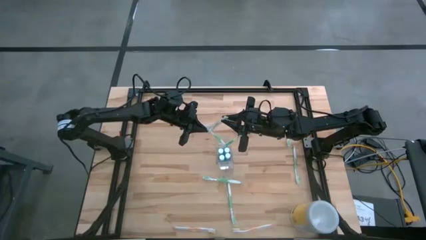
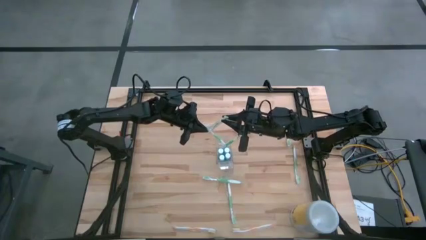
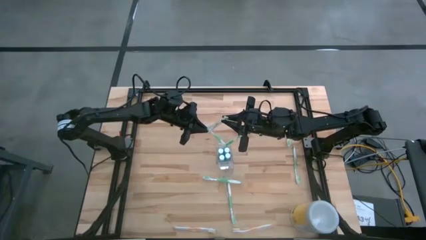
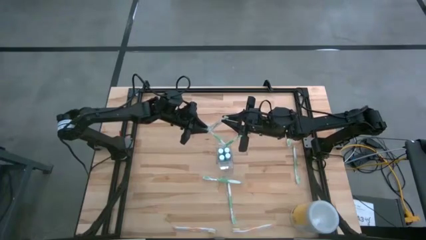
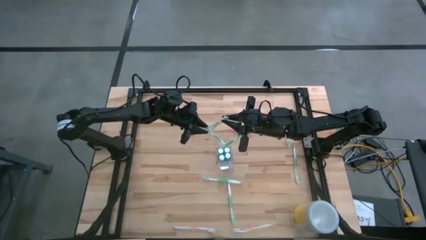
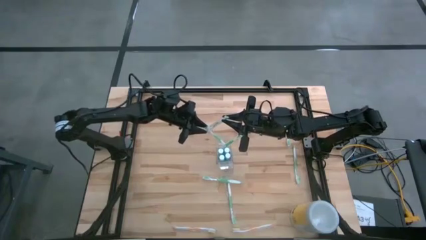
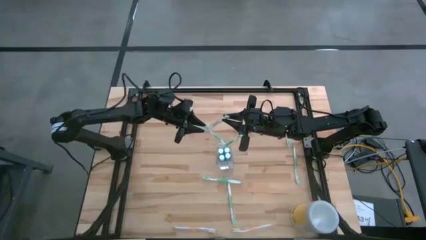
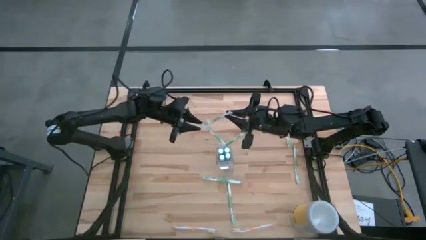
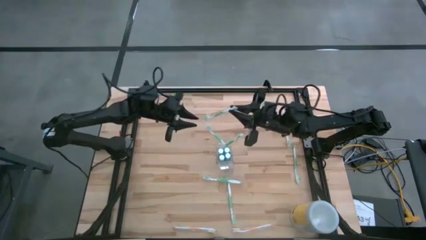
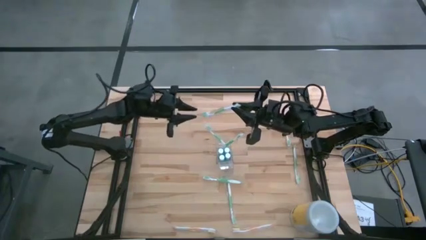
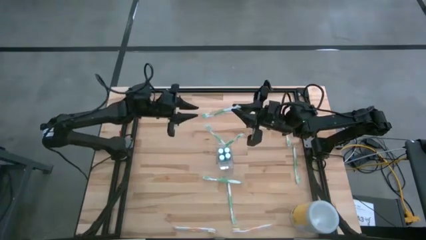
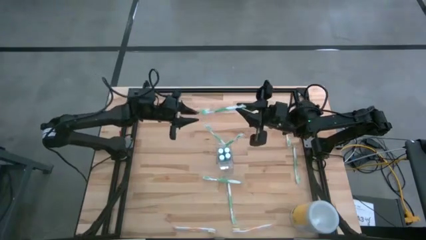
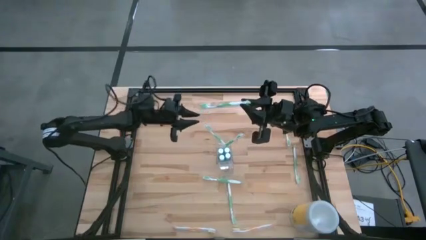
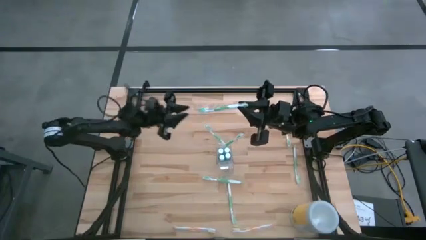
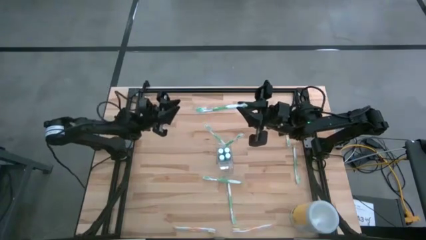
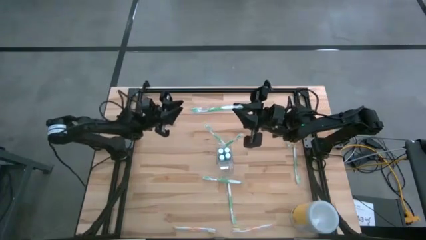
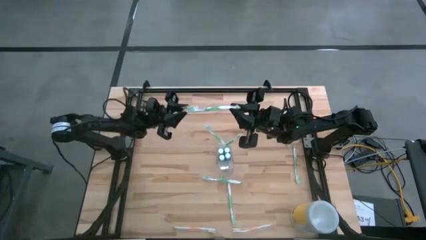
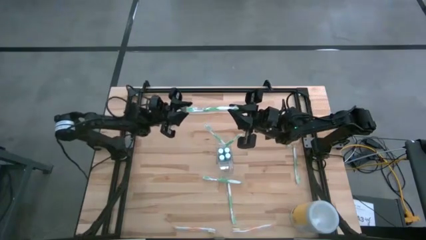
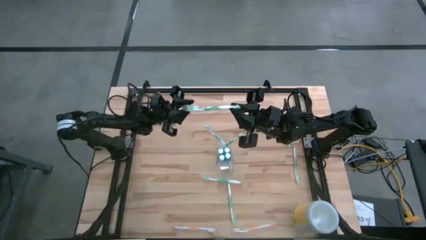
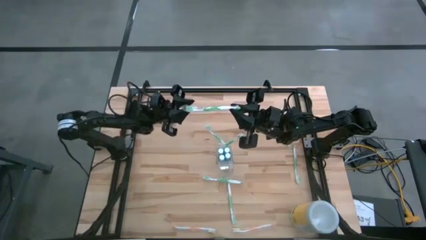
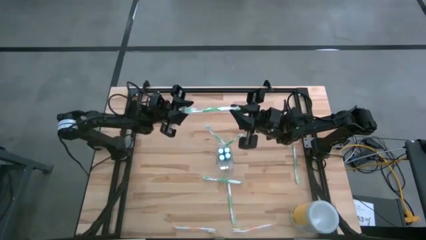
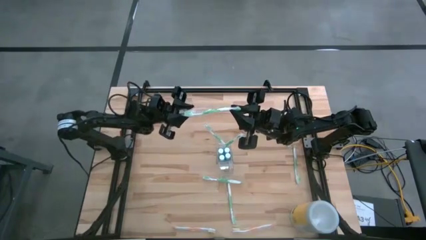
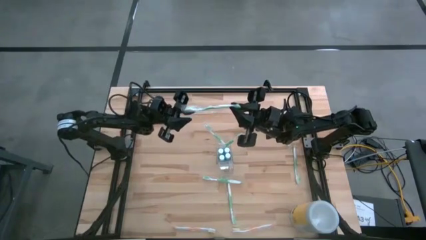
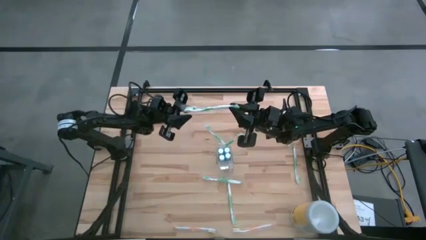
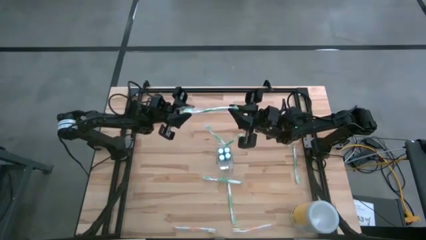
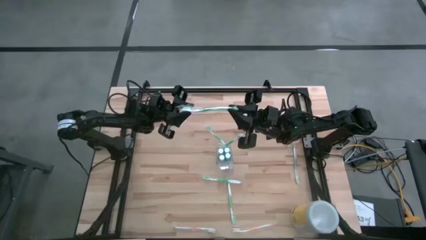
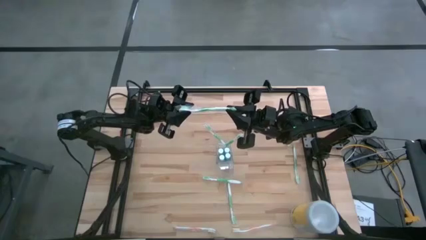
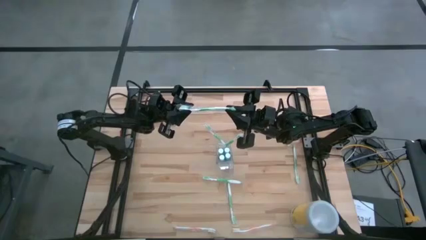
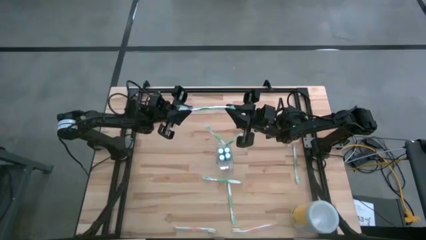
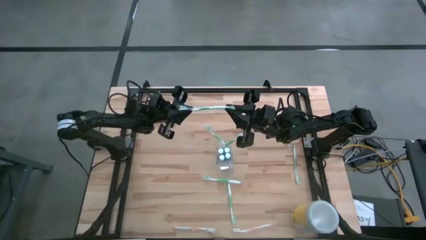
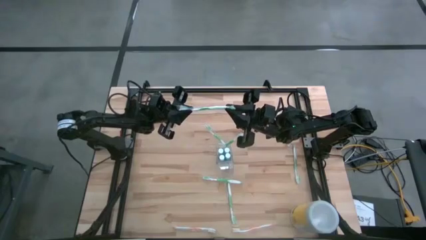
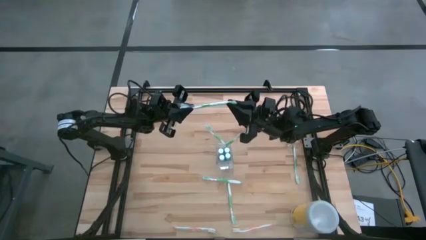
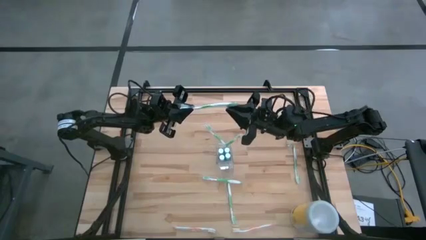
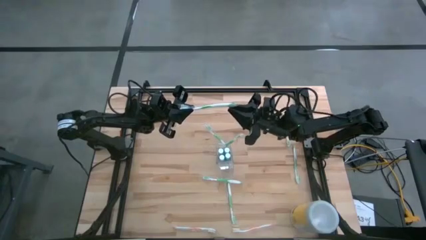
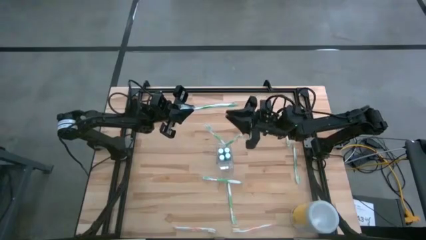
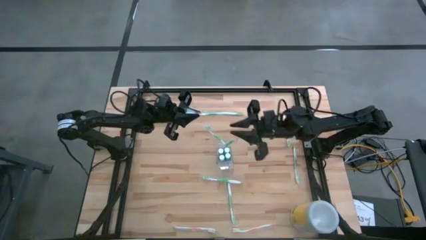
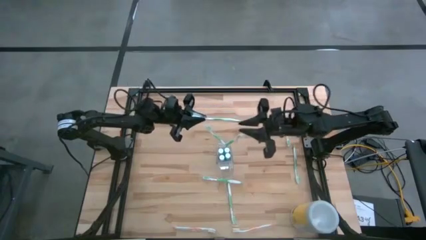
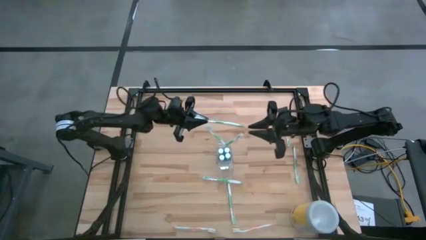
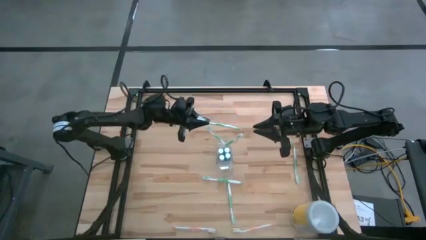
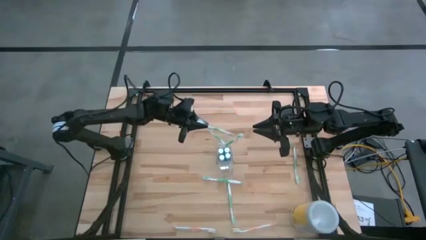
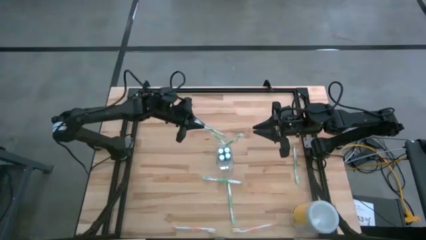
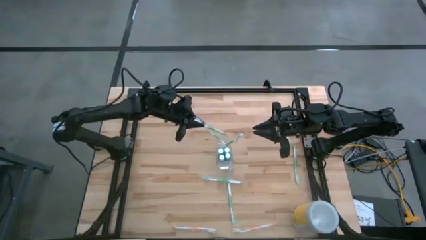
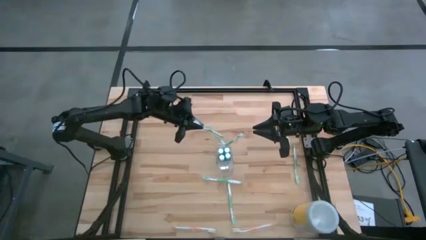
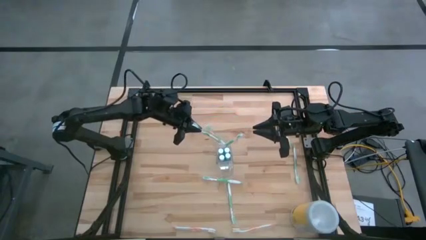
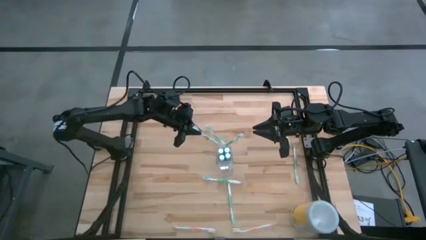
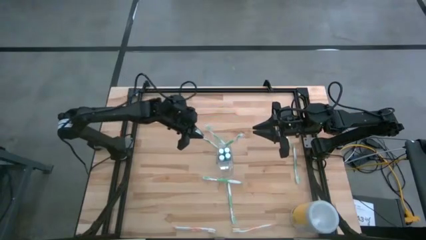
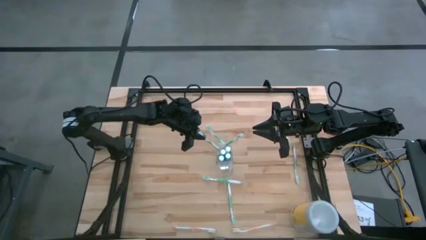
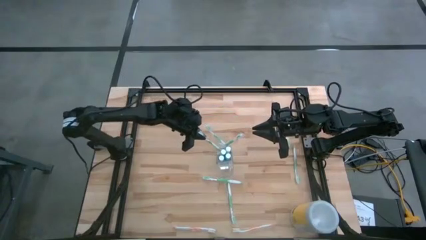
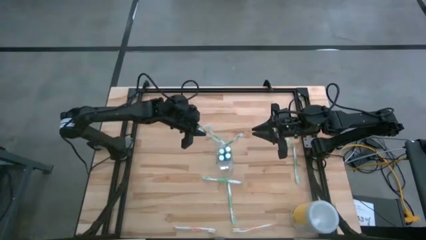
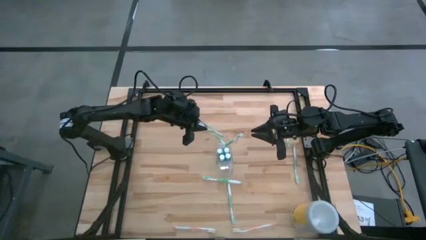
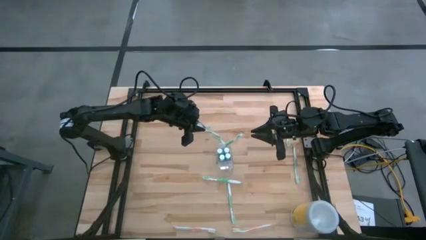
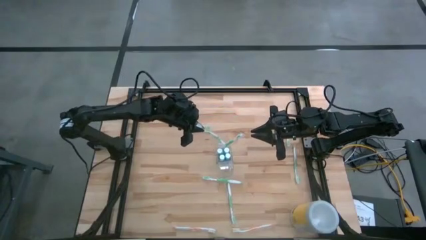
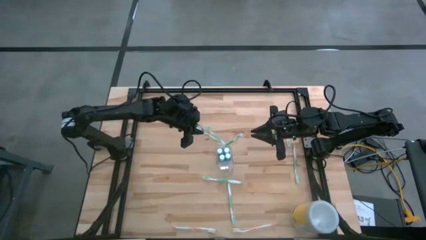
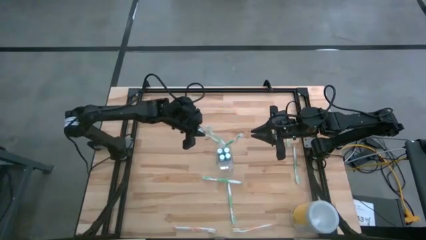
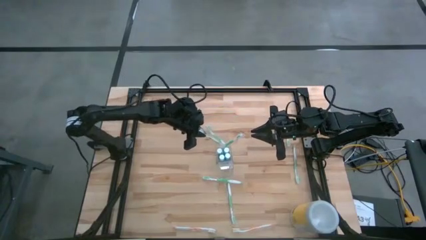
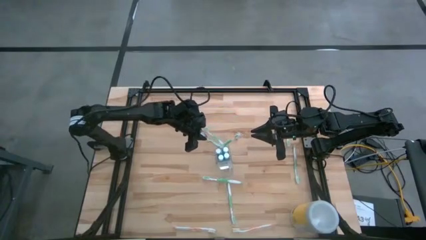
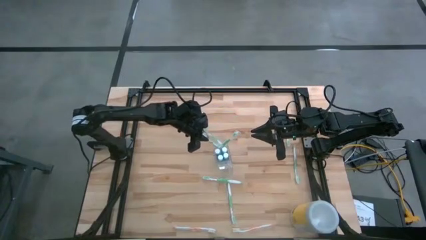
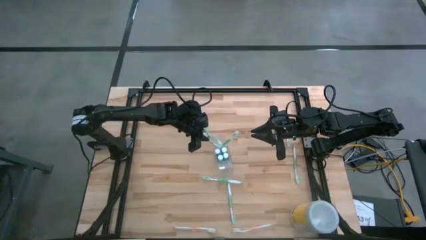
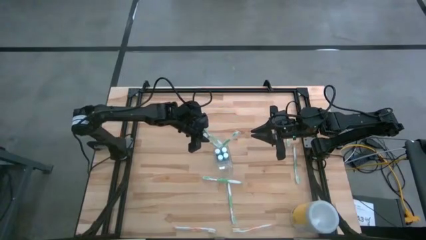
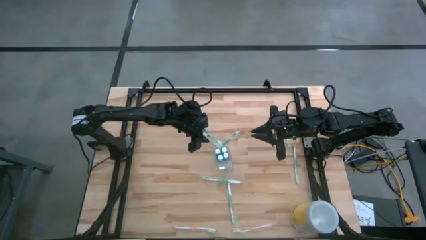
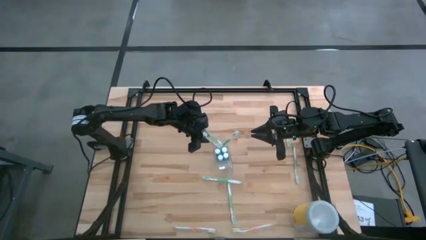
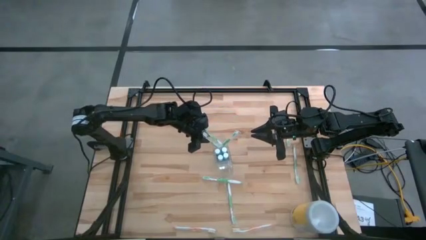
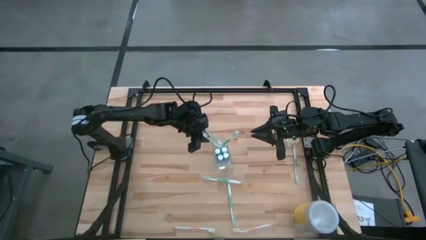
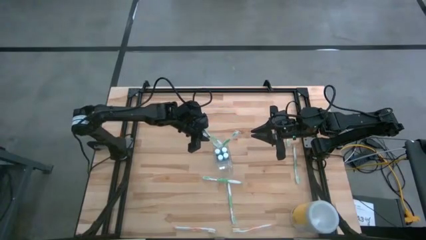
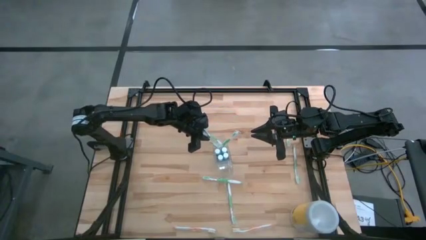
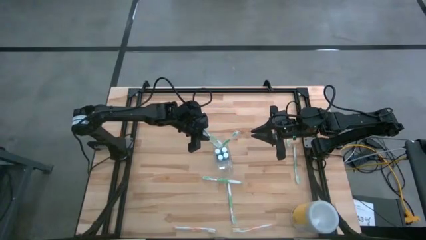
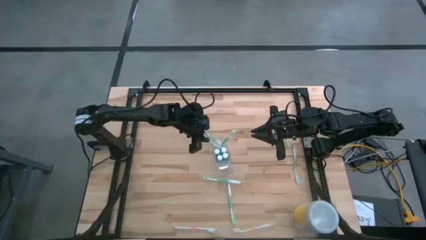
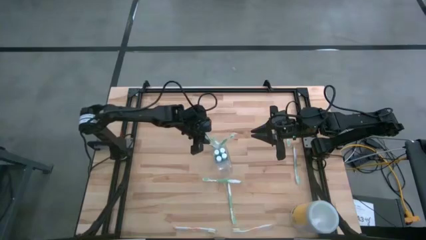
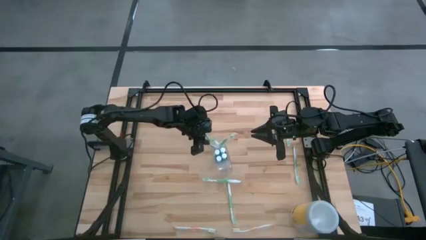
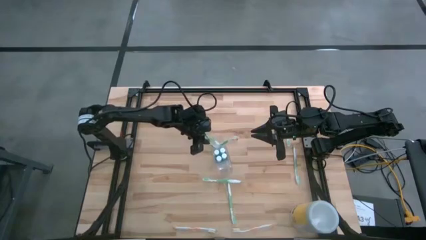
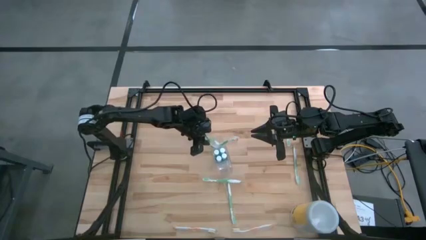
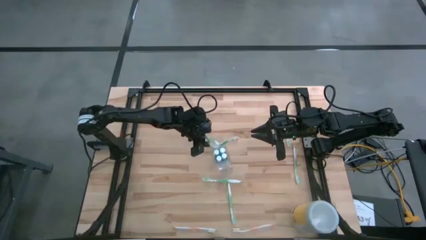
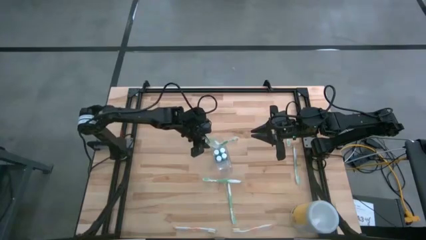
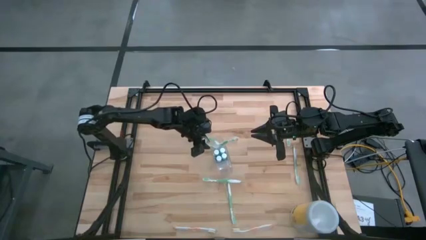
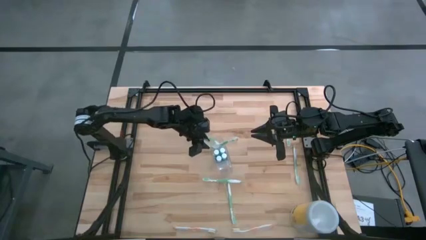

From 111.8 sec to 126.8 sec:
Task: Pick & Place toothbrushing station
Put the white green toothbrush into the back side of the transparent organizer

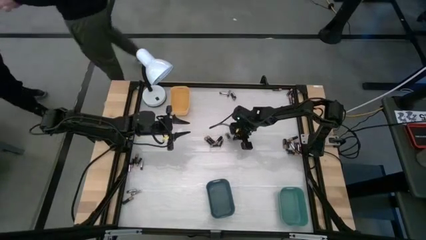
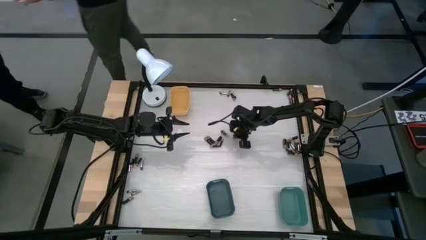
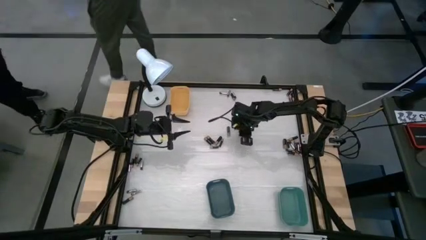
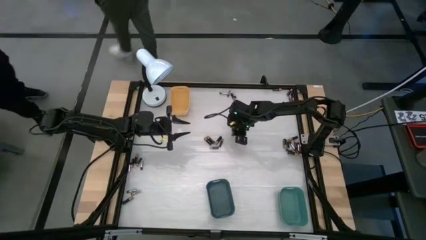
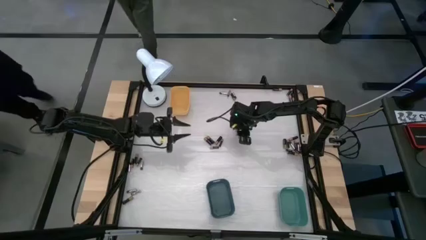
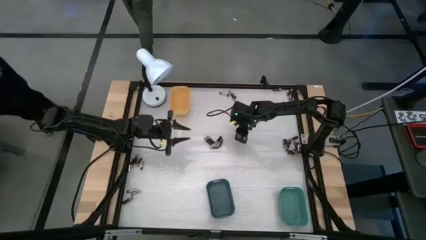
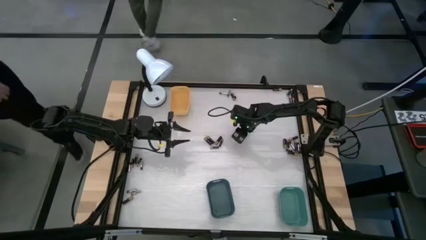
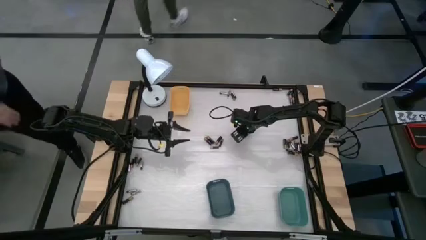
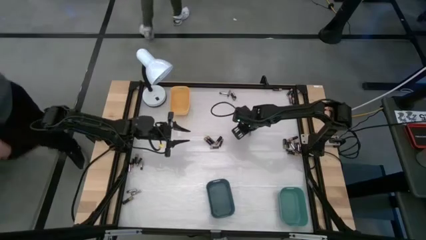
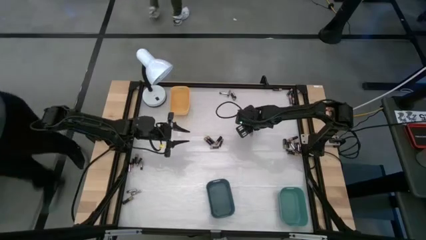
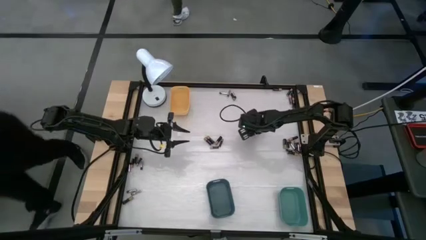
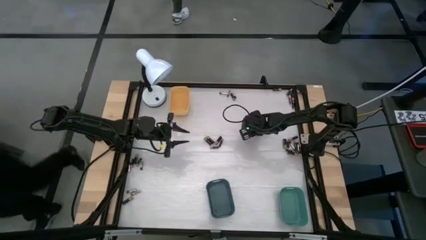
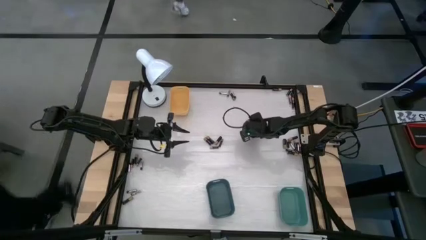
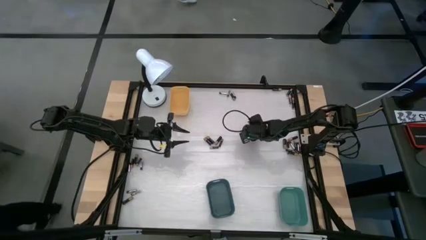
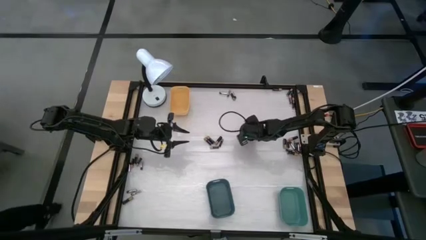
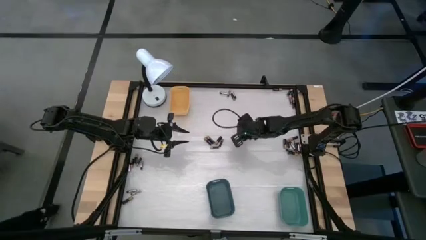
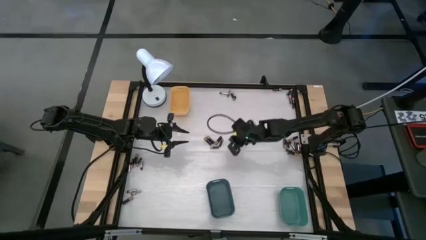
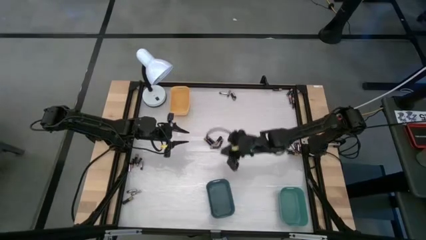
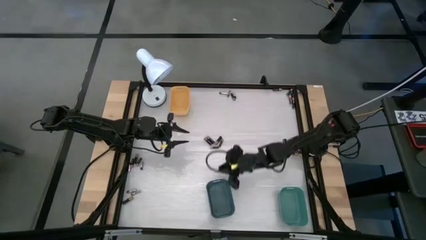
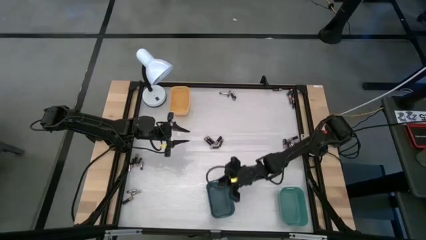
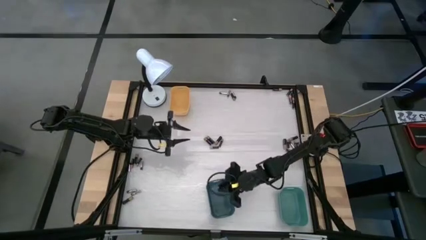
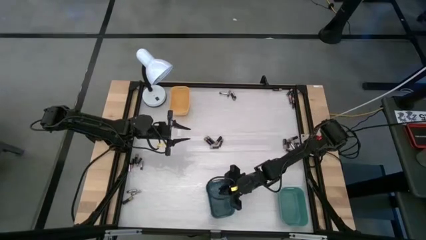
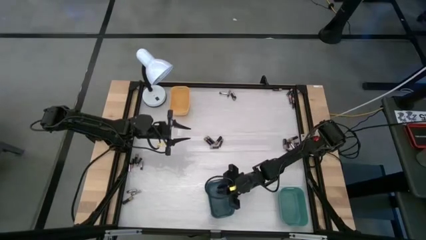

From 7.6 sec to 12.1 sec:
Task: Sort batteries
Put the black battery into the blue bin
